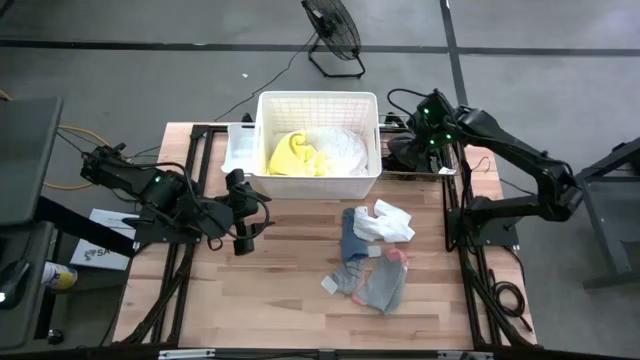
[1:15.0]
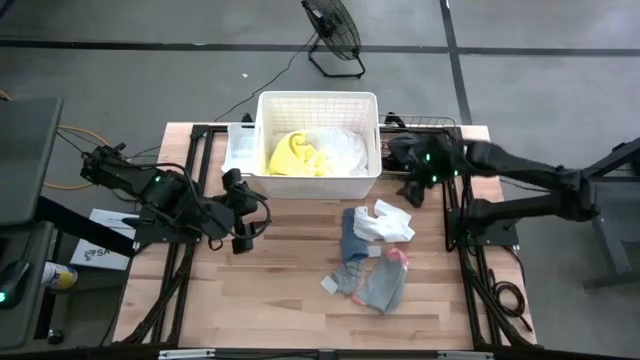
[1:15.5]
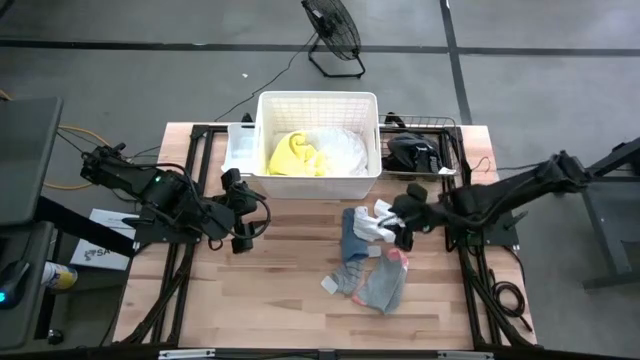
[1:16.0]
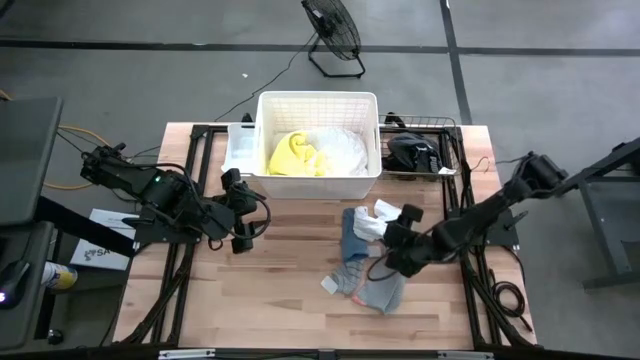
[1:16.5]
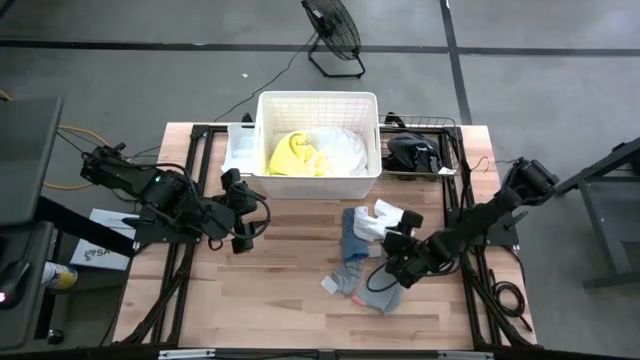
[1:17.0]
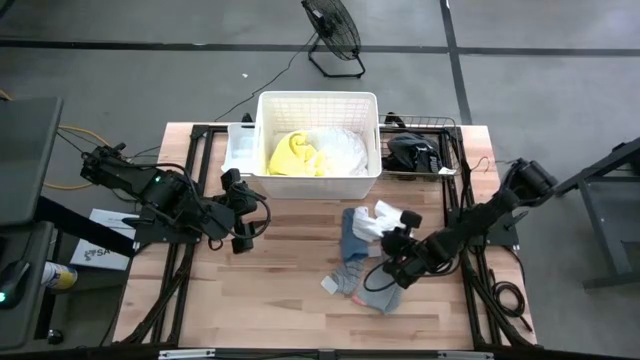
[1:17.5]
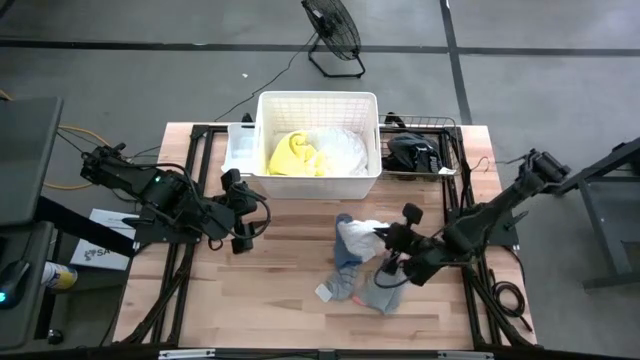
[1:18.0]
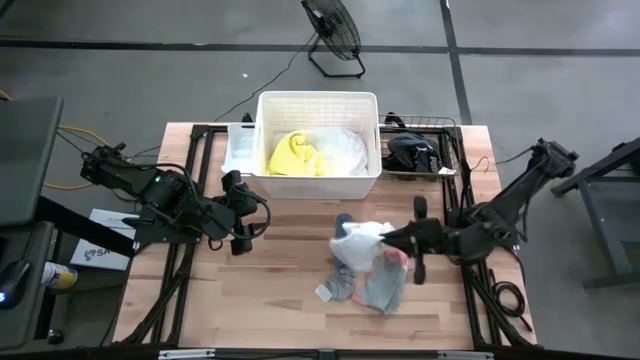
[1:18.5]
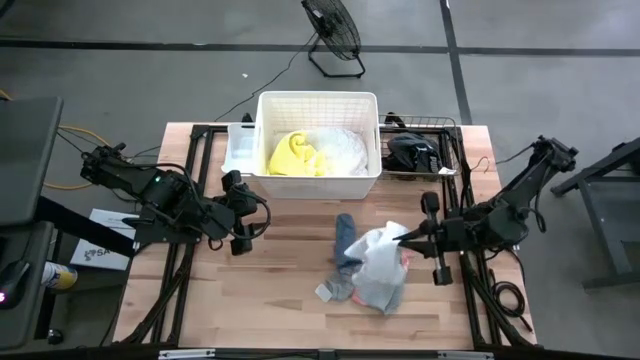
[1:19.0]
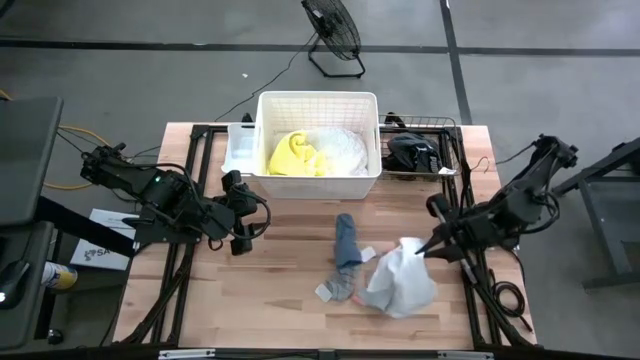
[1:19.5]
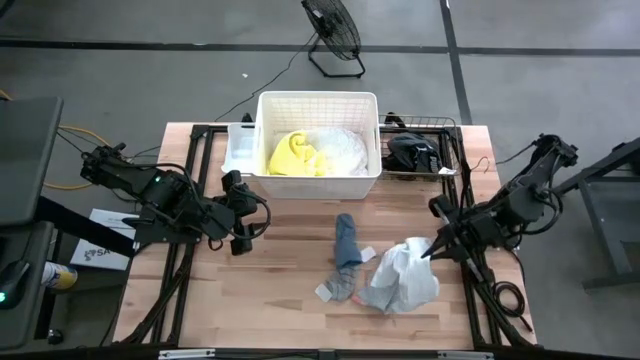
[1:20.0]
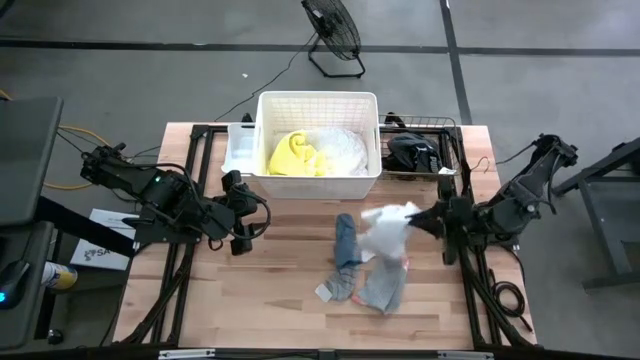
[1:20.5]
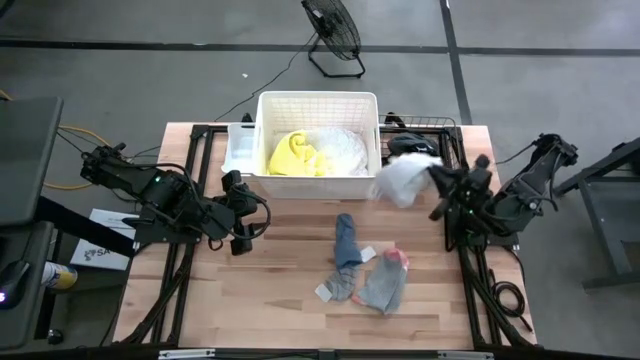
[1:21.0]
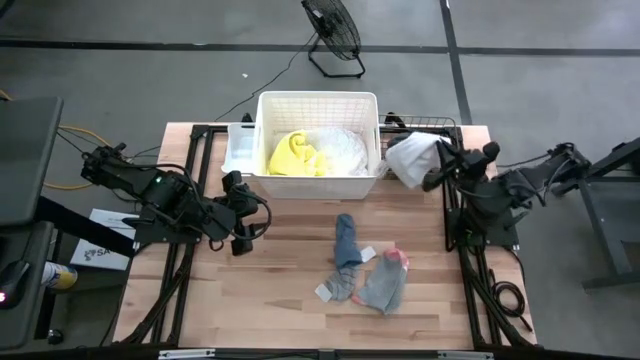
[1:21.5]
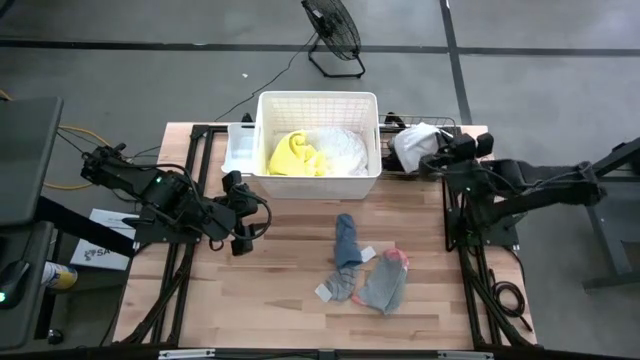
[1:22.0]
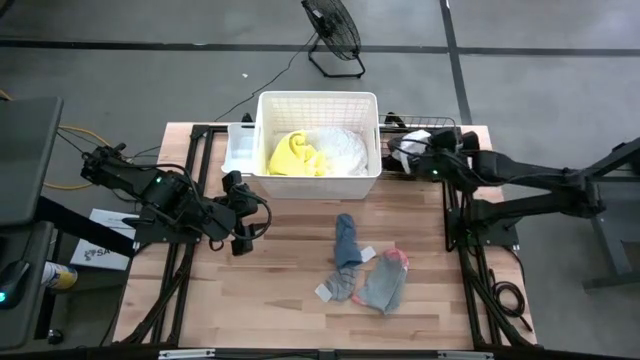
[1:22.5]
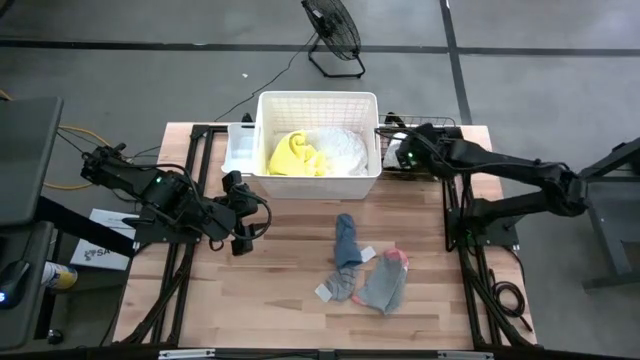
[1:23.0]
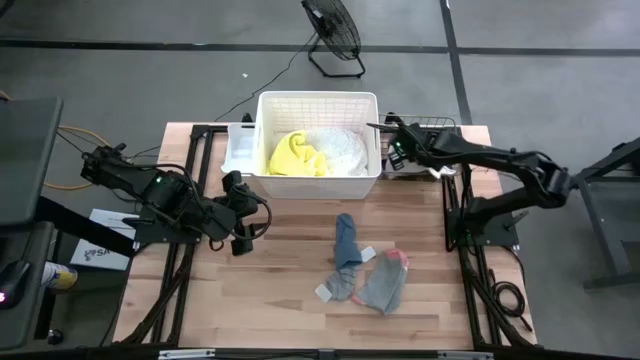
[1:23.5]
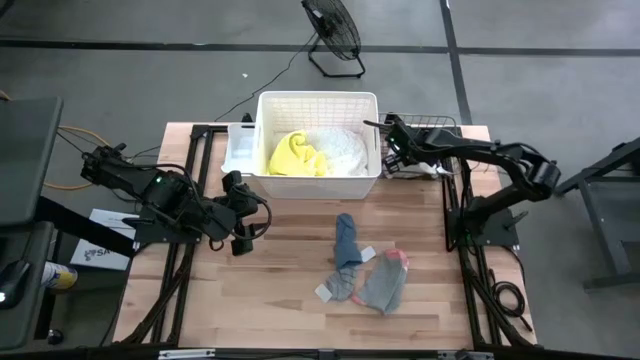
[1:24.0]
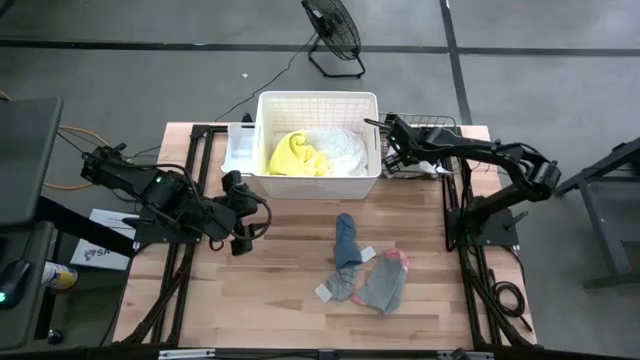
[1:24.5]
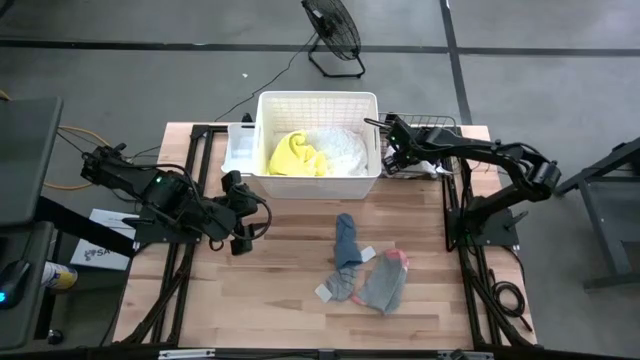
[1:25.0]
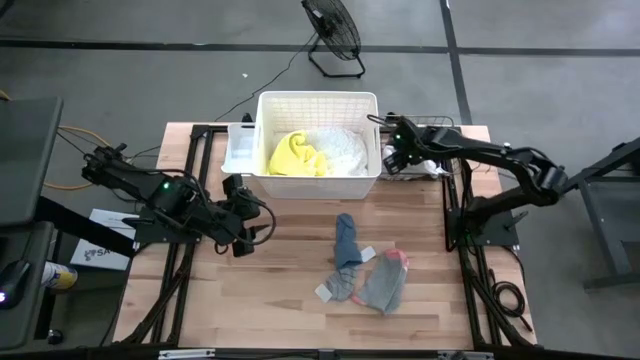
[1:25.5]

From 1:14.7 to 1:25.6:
Task: Pick & Place Cloths
Put the white shorts into the wire basket

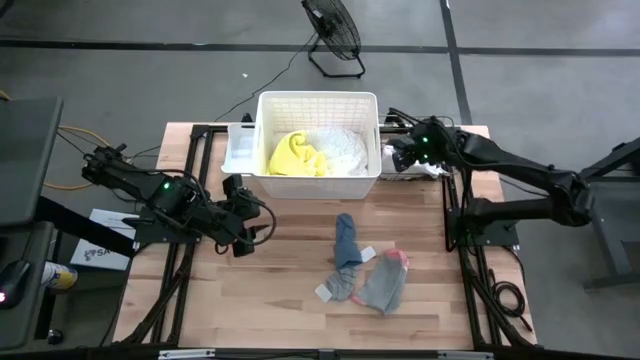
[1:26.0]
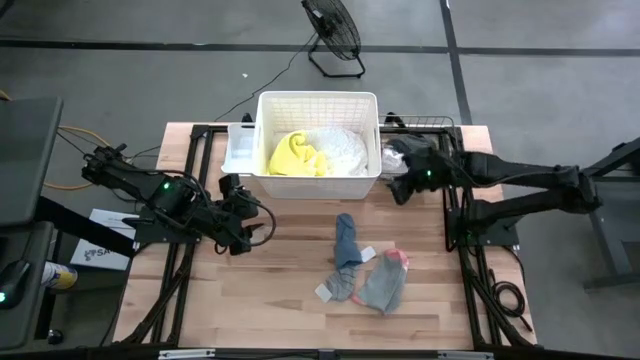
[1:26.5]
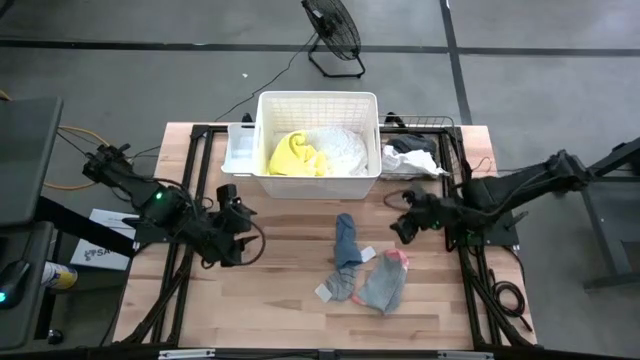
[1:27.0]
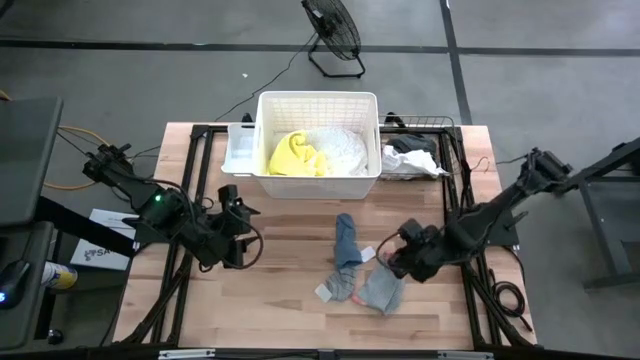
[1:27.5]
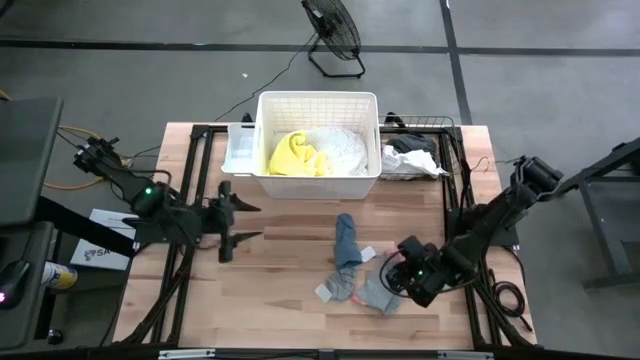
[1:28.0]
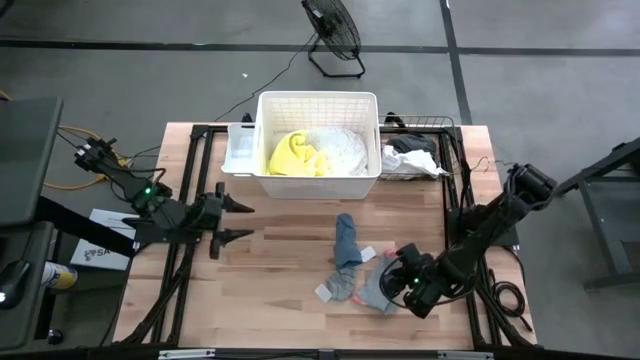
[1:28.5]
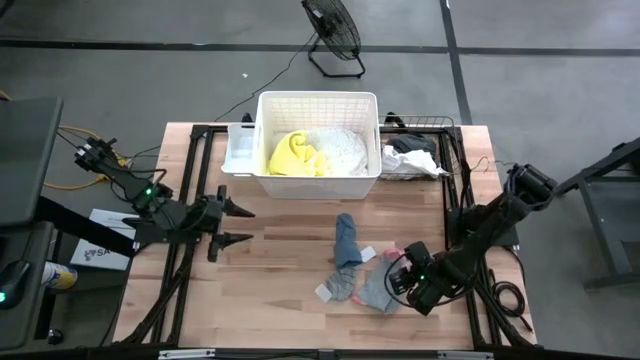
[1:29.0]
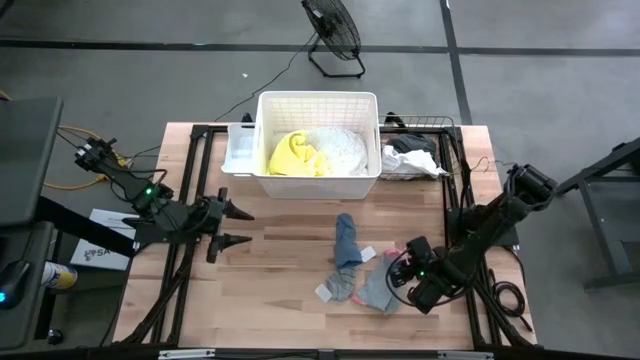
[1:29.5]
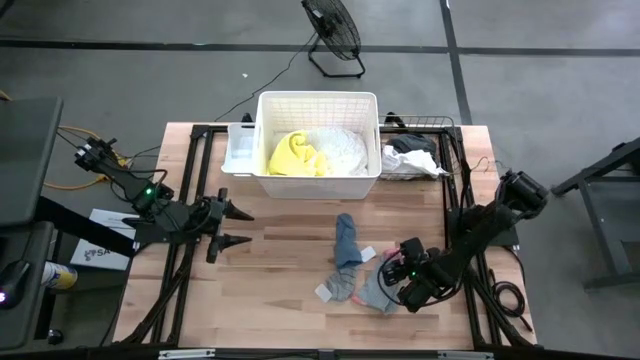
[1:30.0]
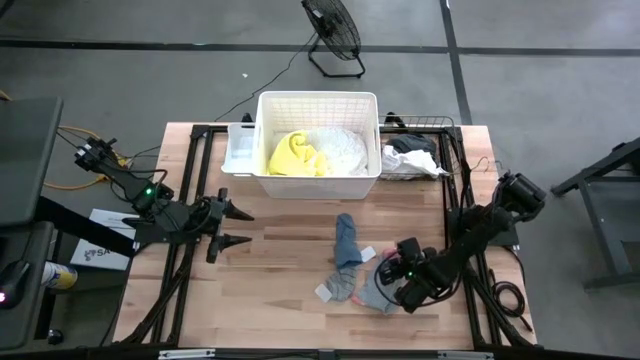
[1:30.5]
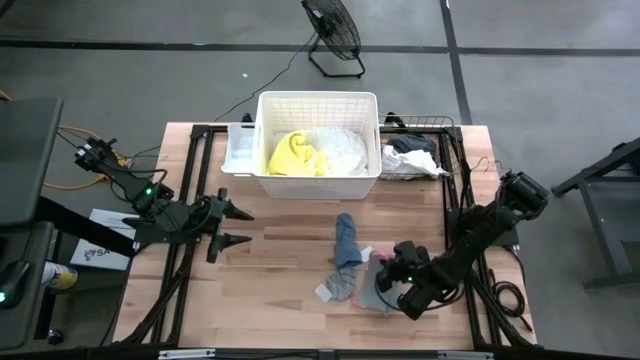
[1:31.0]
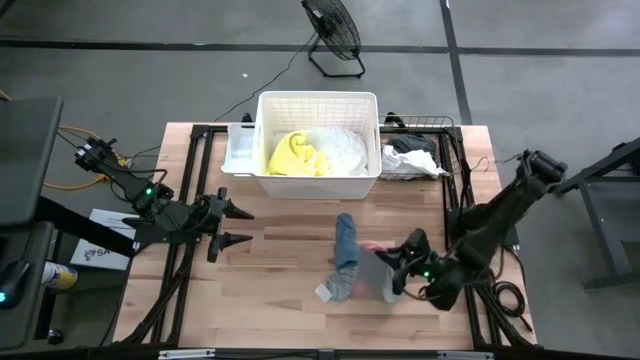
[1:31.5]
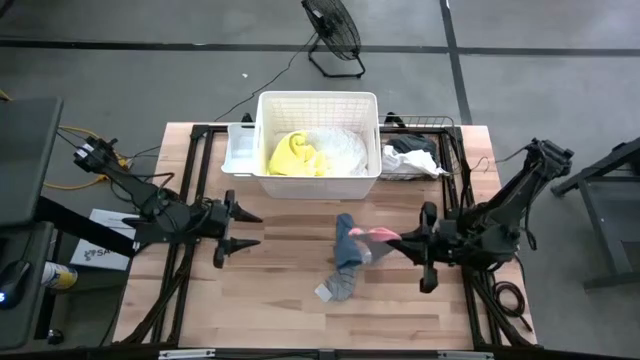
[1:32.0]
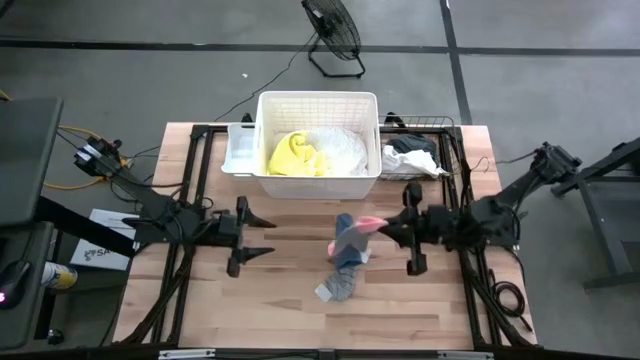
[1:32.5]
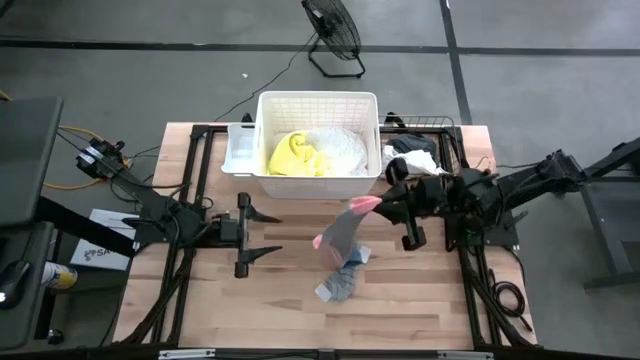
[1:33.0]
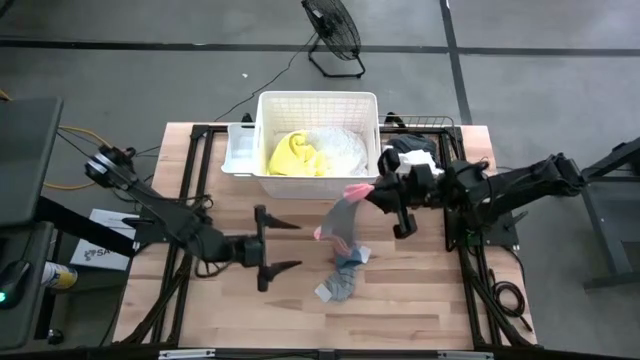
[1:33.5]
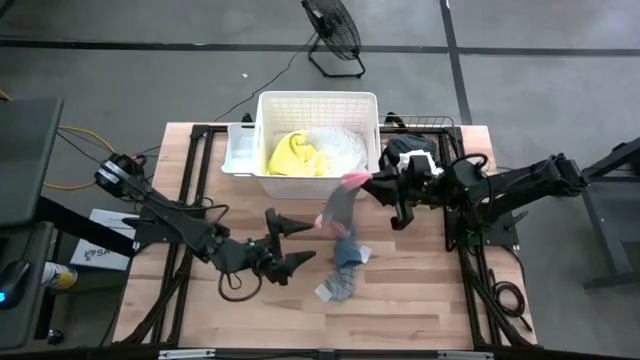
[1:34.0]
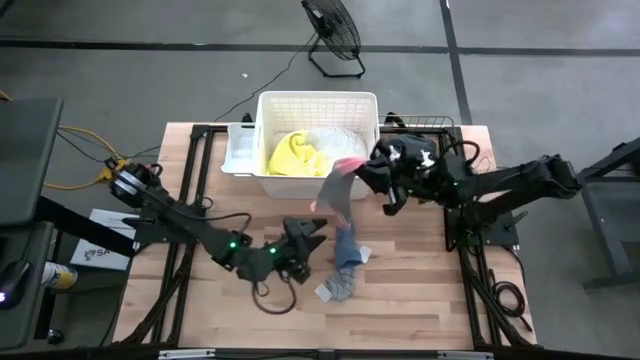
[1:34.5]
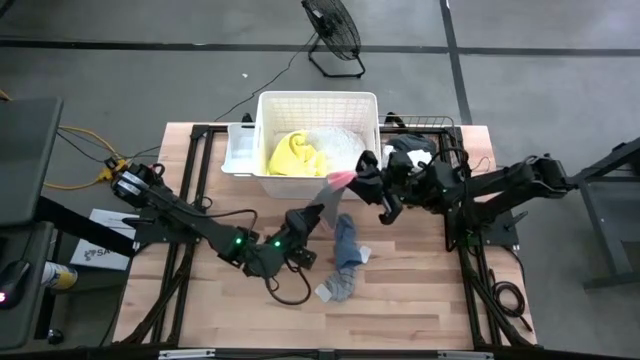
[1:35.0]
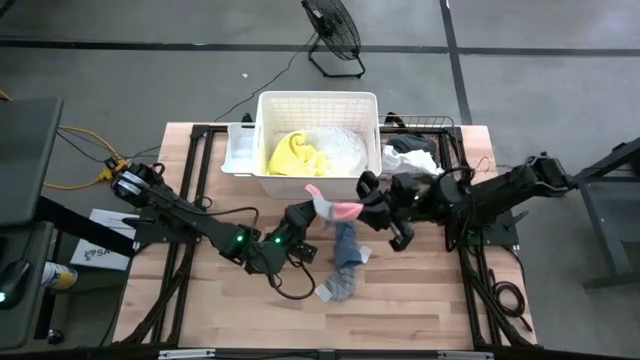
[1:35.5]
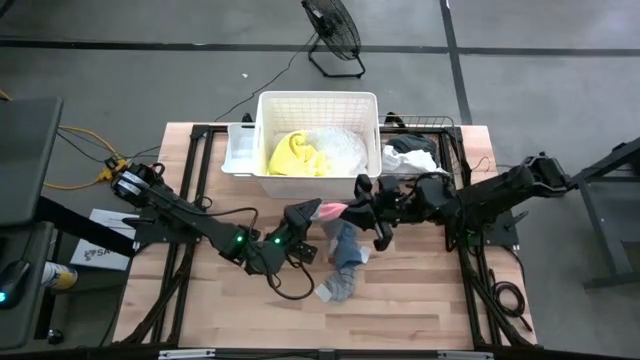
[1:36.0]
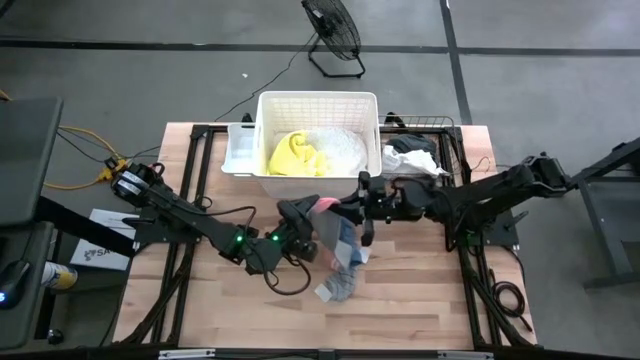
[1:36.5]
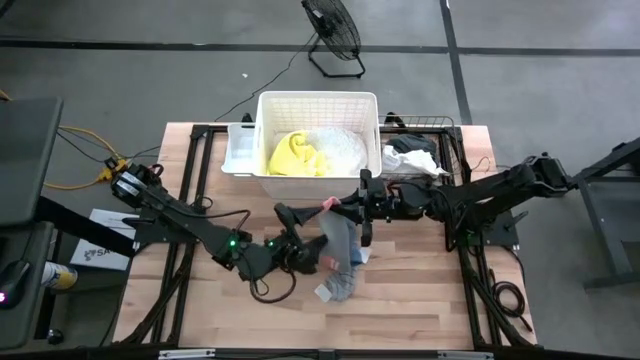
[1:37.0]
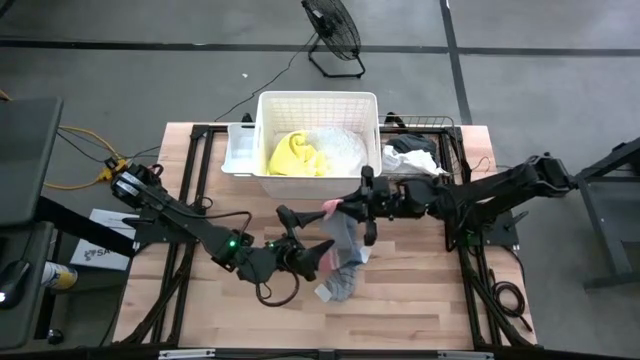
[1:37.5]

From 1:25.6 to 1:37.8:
Put the pink and gray sock into the white bin
